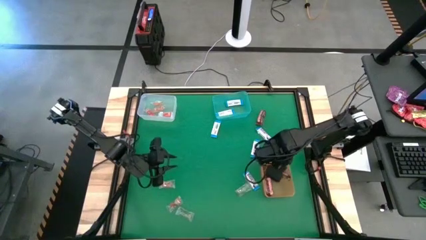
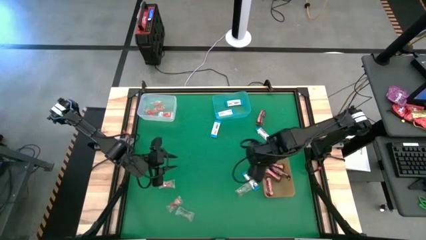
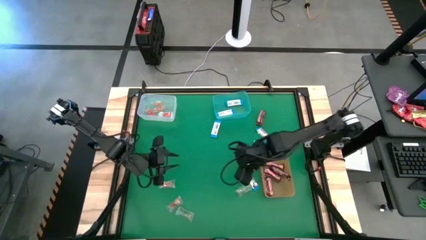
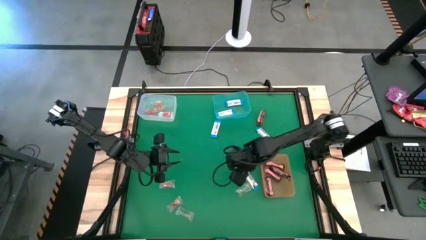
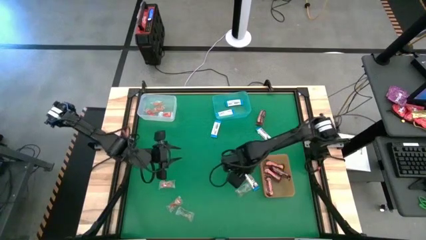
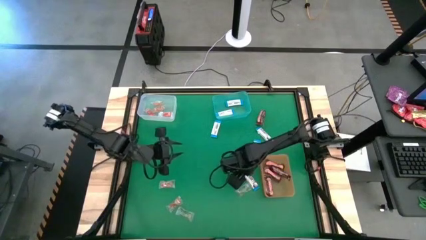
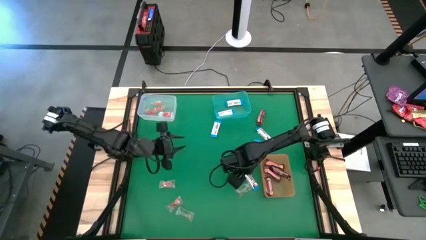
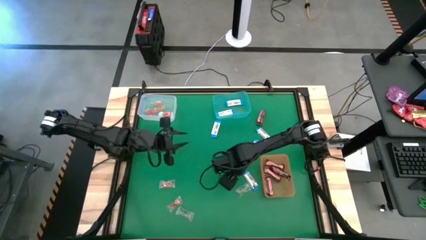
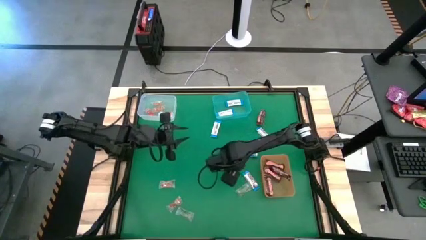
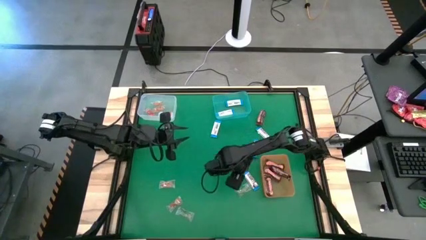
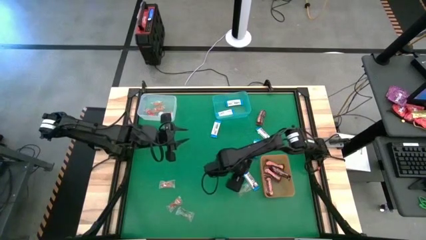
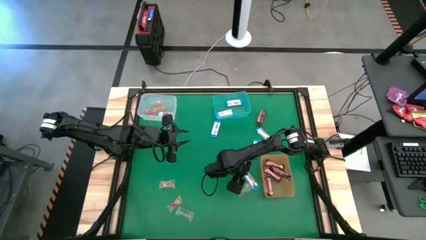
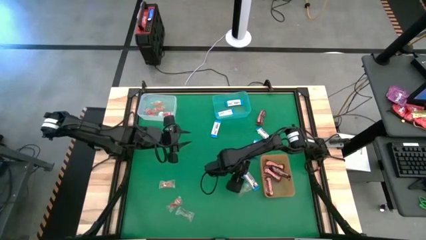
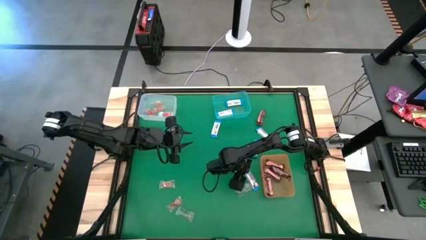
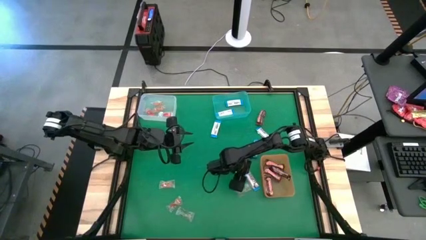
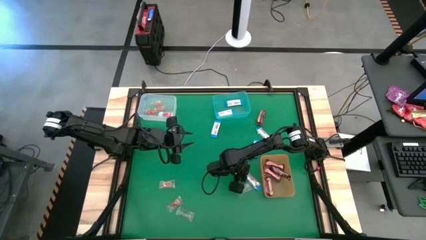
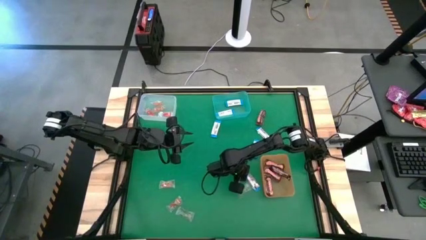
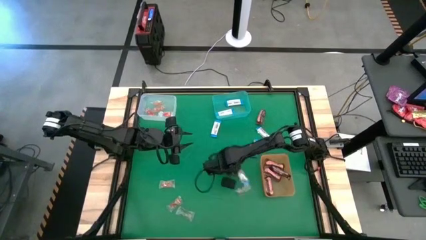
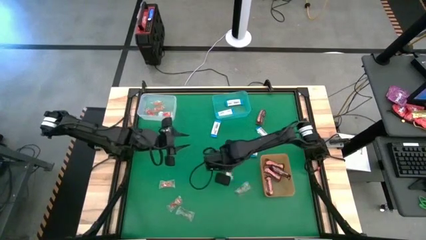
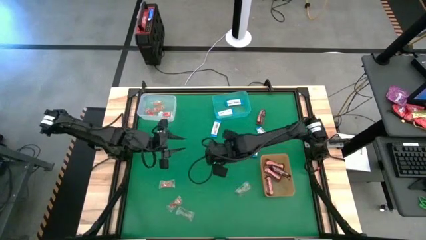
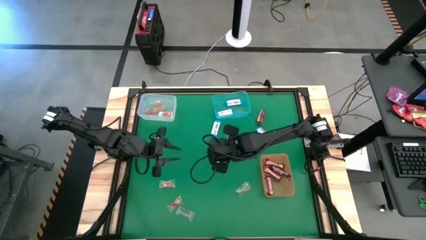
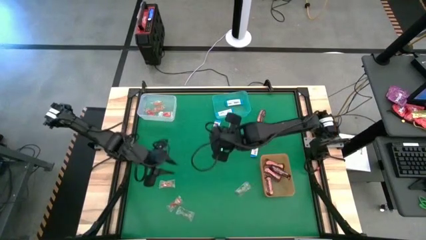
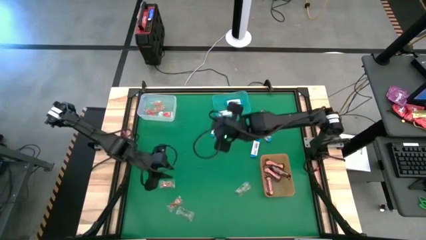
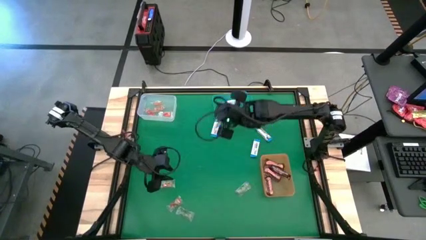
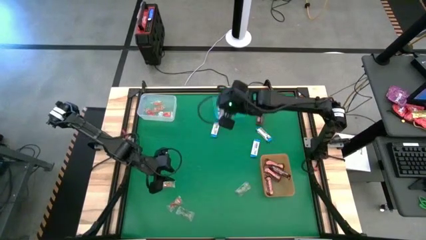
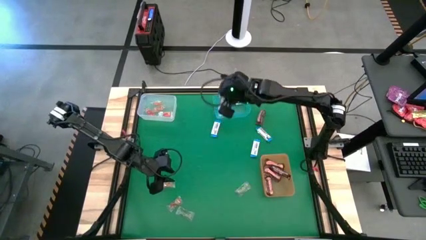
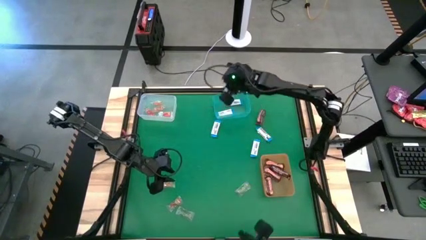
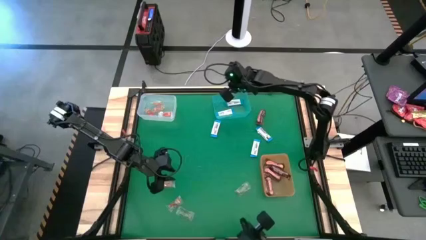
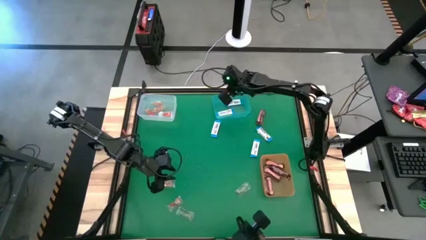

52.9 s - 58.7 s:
Task: Sort candy by brand, put in halloween buckets
Put the white chocolate into the light blue bin

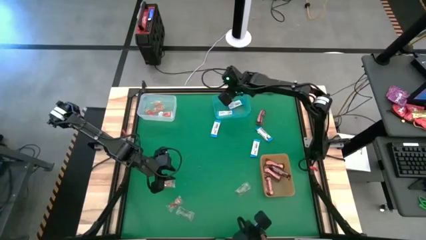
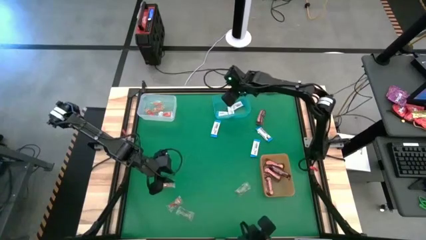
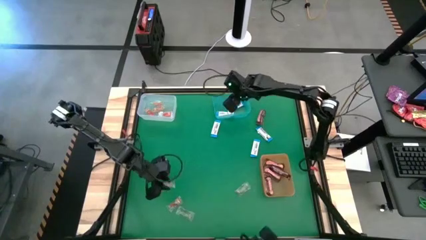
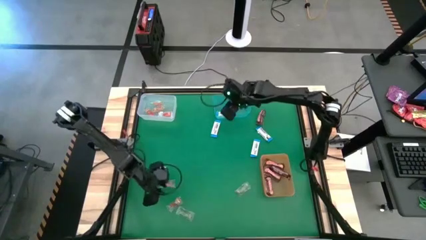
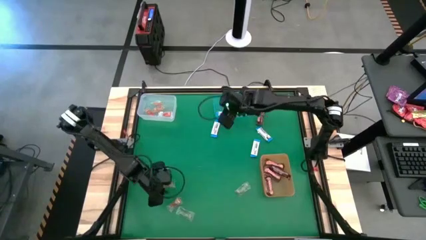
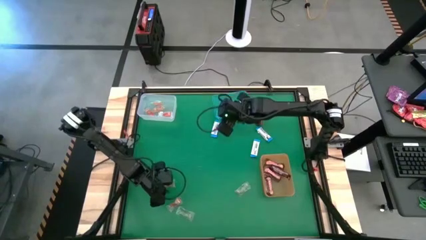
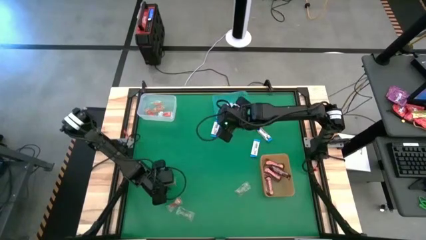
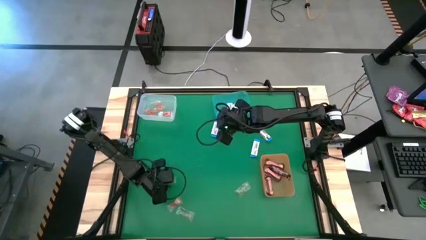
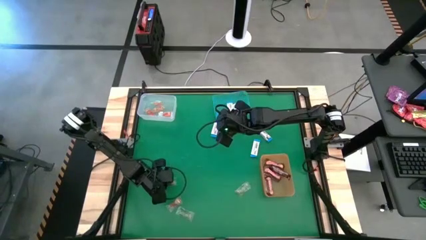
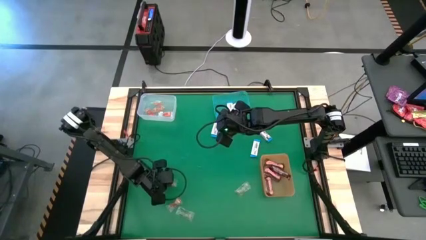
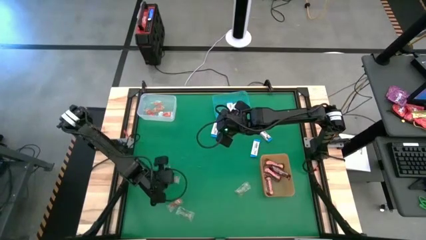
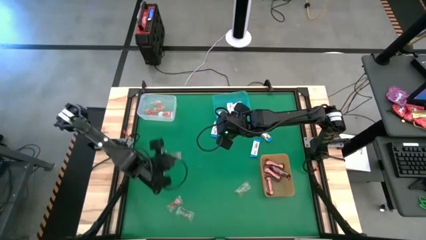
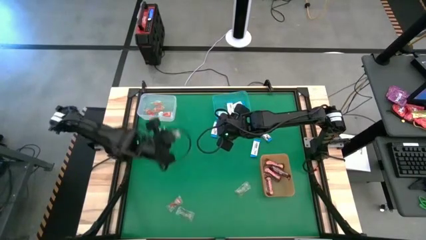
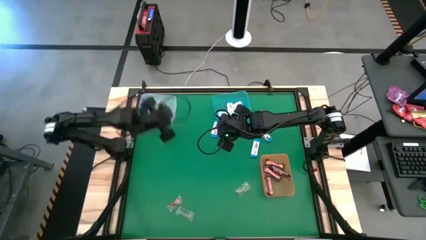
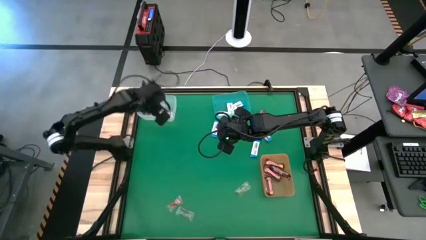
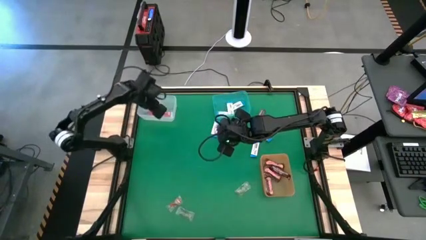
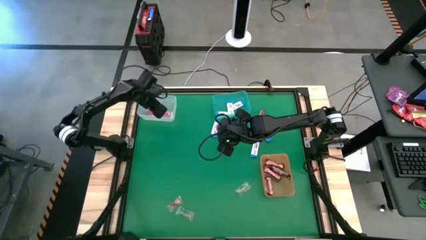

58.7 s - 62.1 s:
Put the orange gummy into the transparent bin

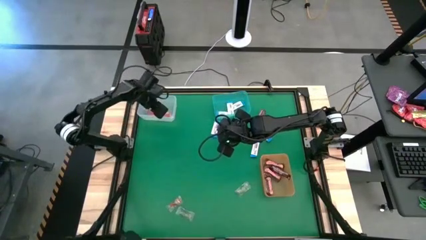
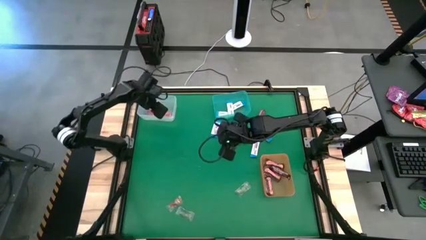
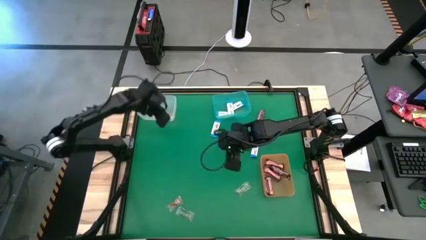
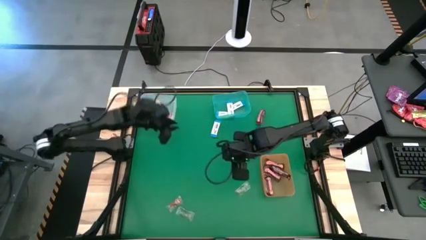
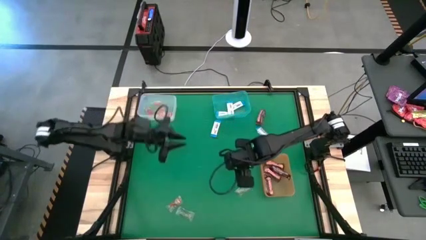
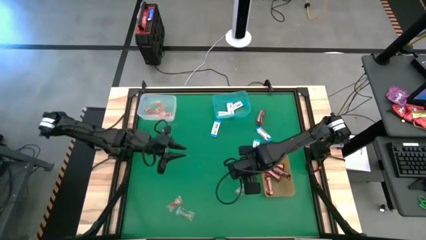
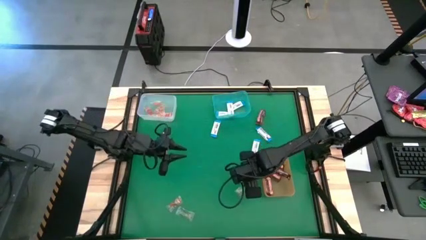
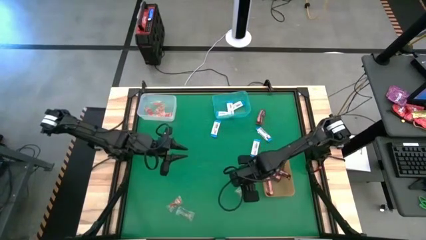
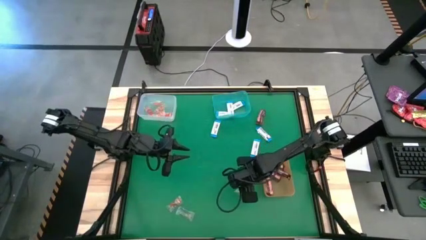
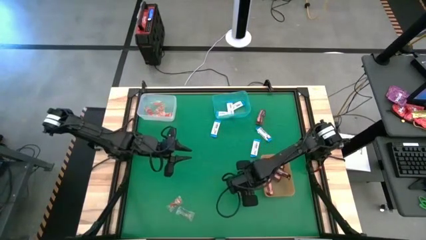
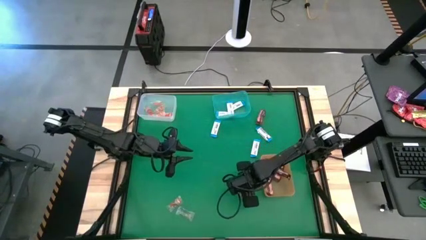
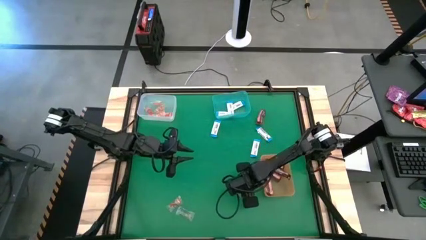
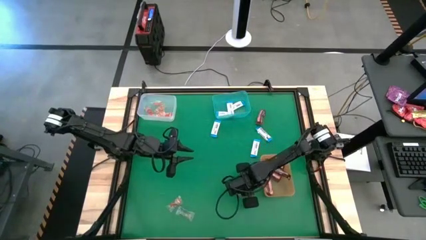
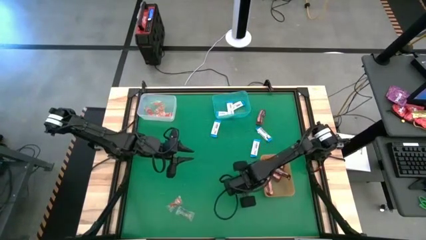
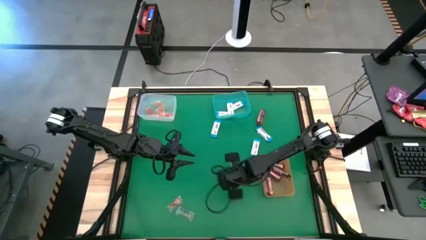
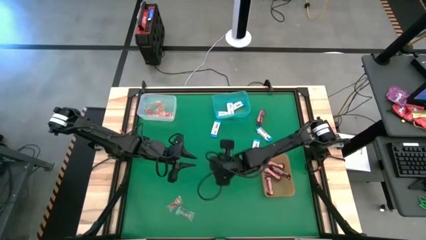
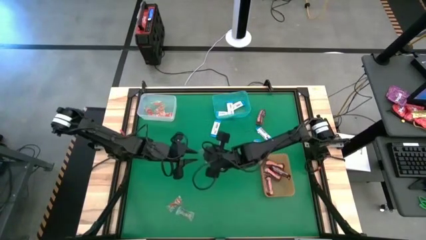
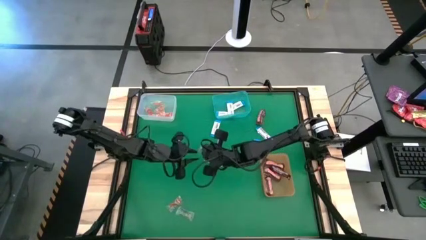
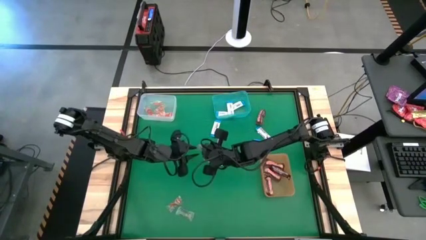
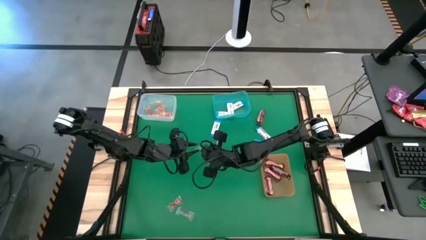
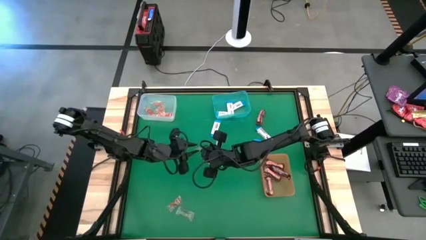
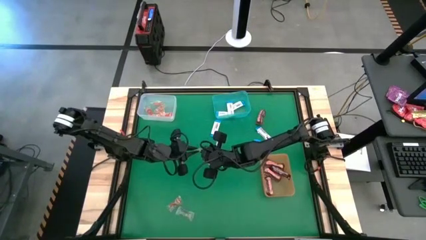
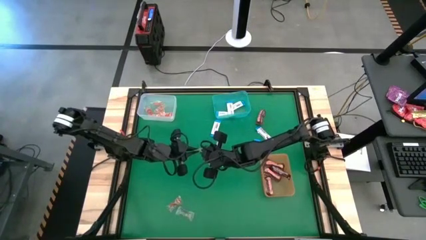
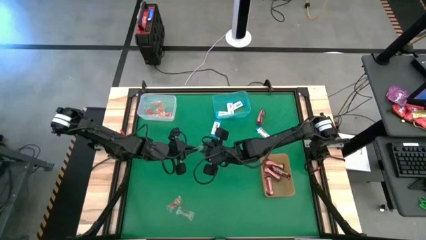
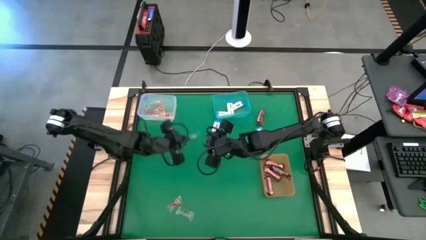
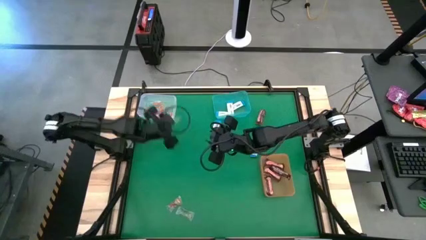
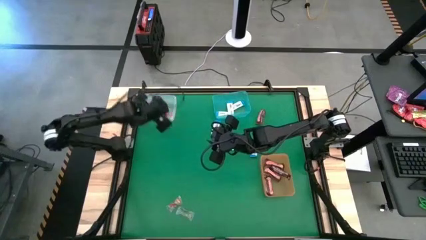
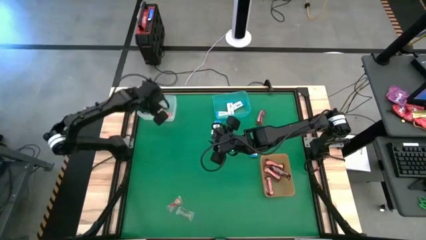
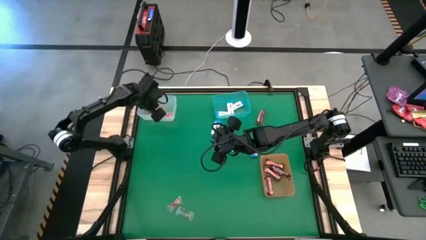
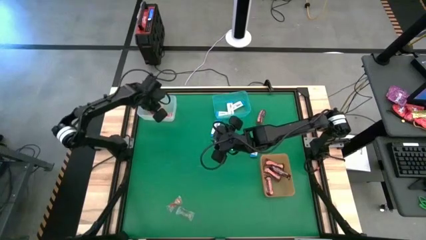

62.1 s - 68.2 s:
Put the green gummy into the white bin

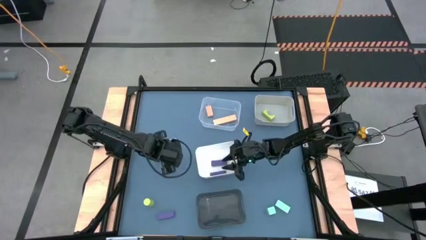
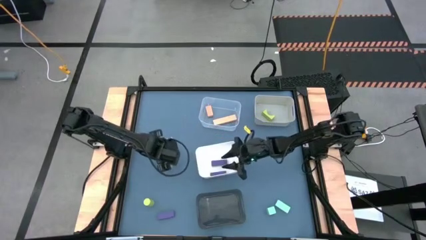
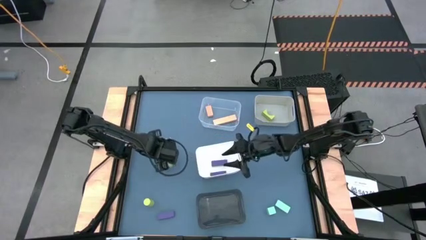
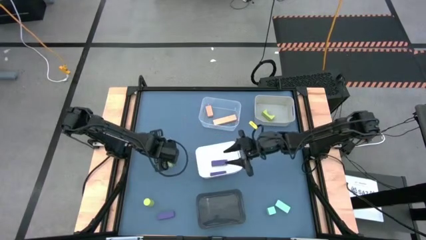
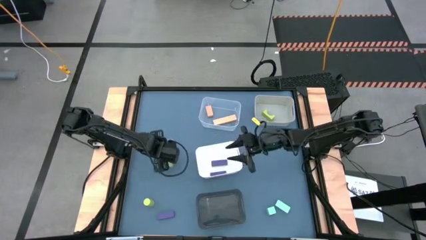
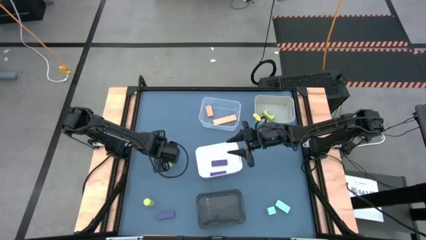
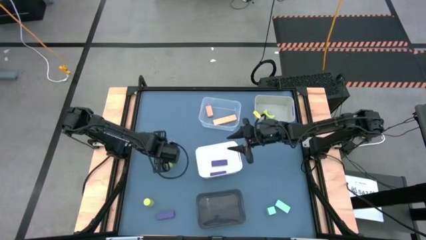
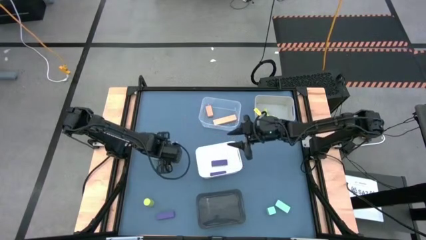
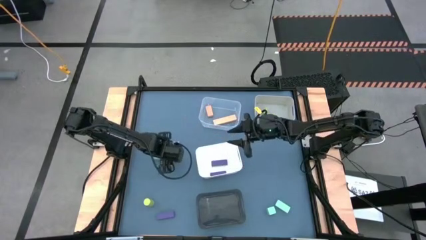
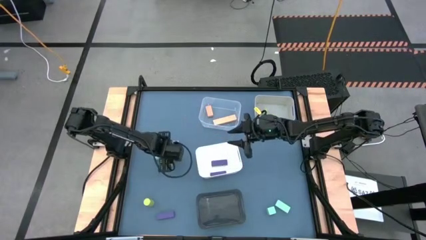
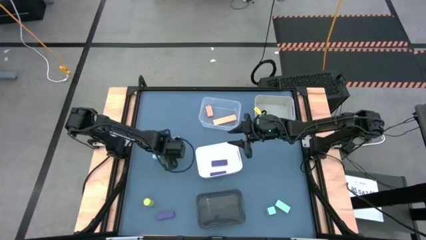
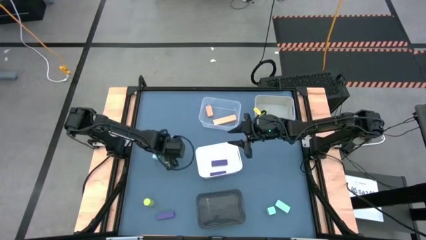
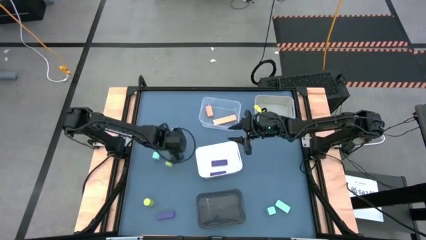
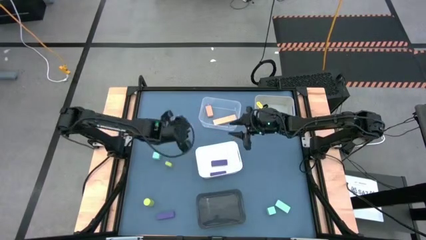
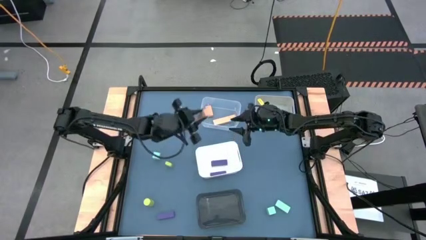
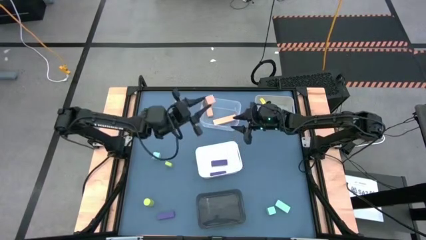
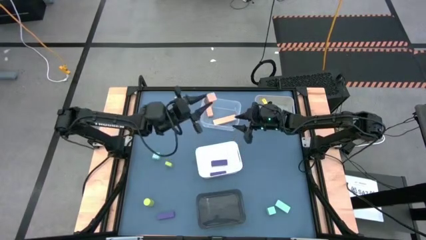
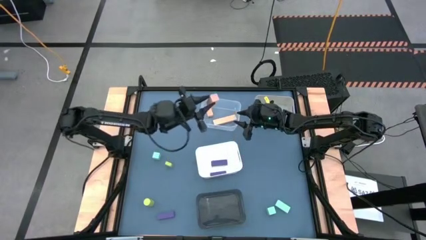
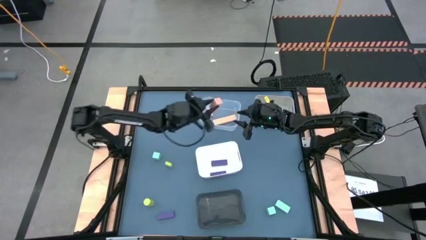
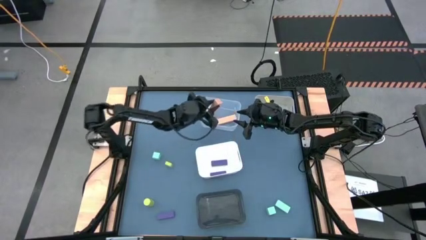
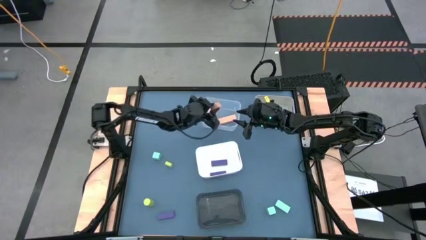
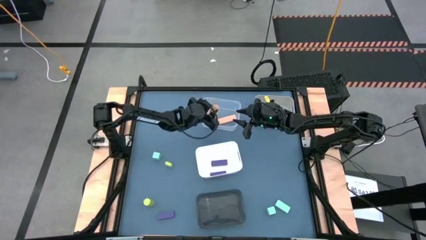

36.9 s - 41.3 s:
Task: Sort & place blocks by color
Put the orange rectangle block into the transparent bin
